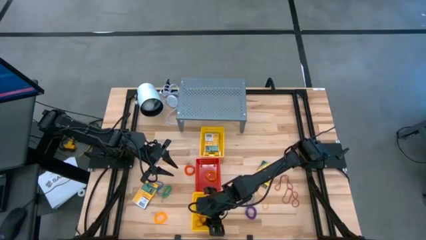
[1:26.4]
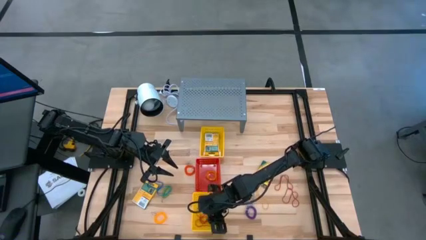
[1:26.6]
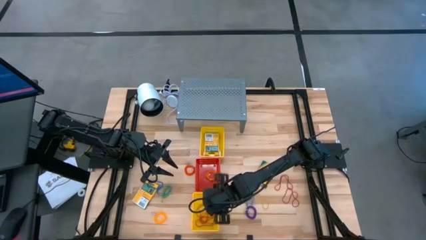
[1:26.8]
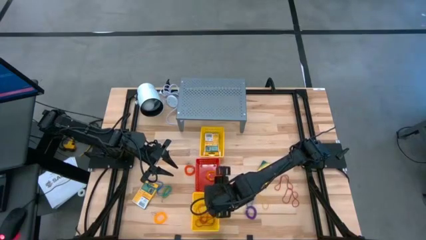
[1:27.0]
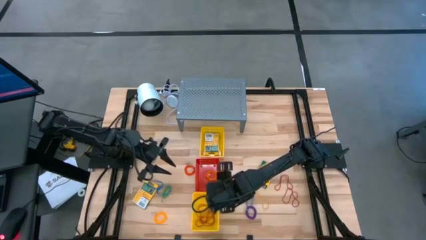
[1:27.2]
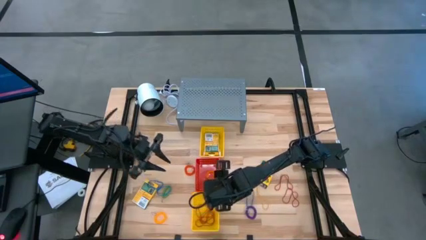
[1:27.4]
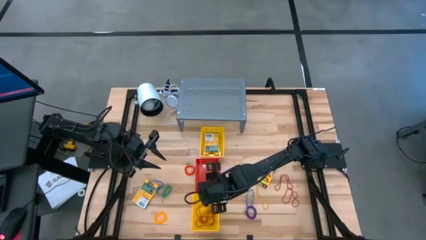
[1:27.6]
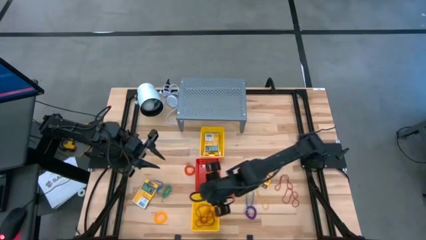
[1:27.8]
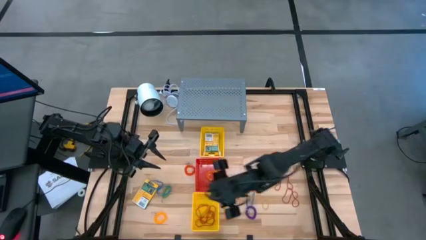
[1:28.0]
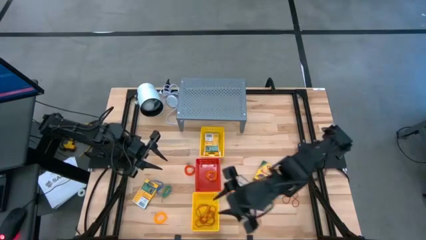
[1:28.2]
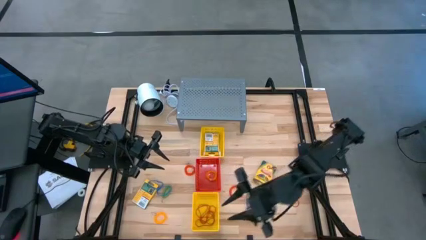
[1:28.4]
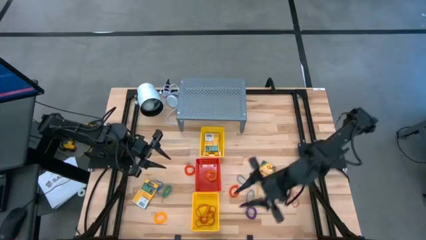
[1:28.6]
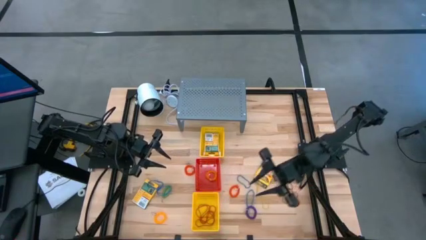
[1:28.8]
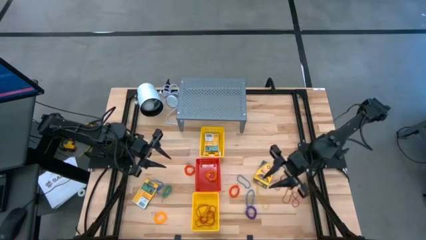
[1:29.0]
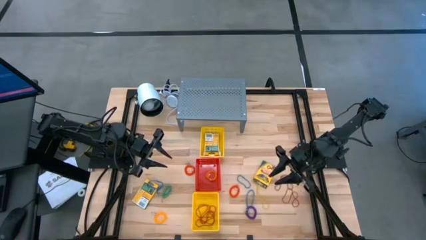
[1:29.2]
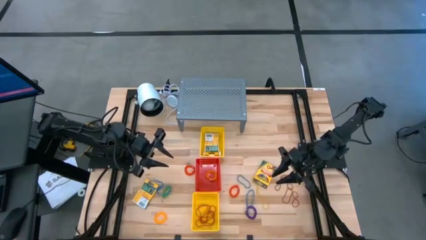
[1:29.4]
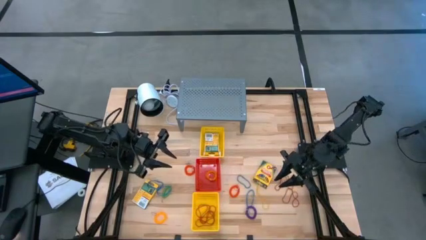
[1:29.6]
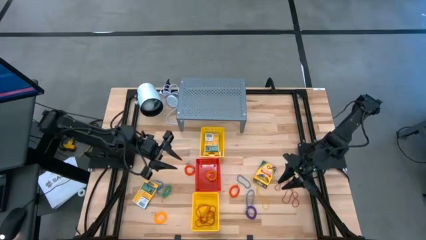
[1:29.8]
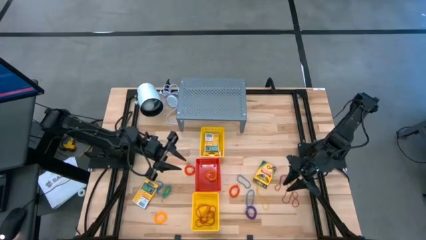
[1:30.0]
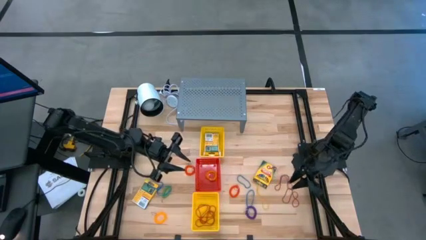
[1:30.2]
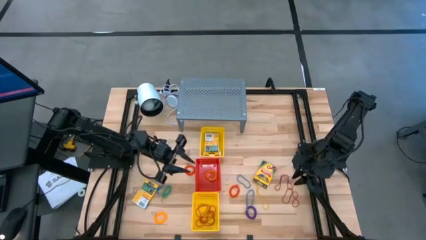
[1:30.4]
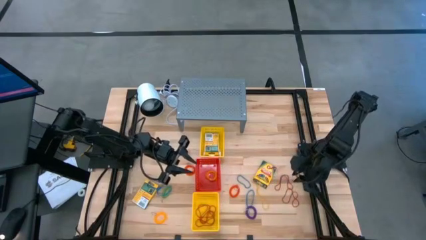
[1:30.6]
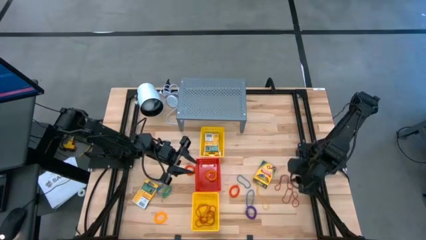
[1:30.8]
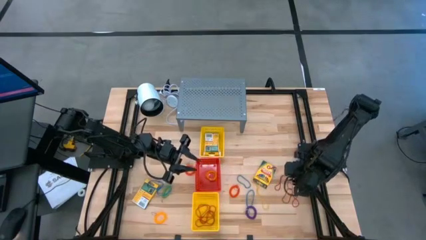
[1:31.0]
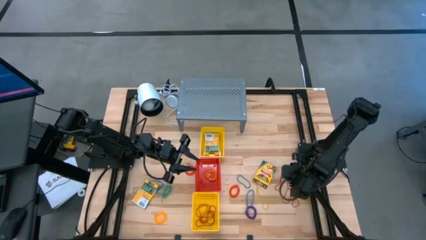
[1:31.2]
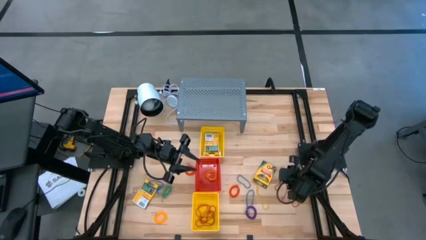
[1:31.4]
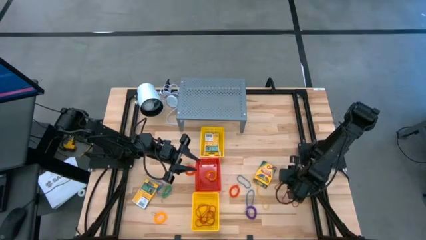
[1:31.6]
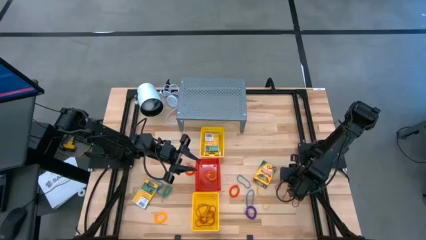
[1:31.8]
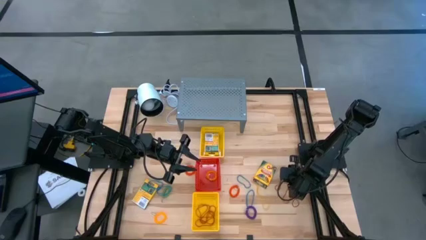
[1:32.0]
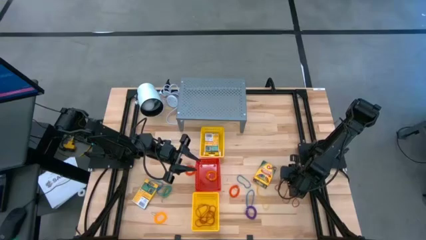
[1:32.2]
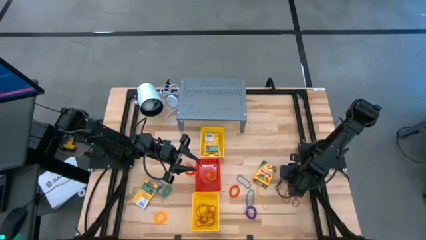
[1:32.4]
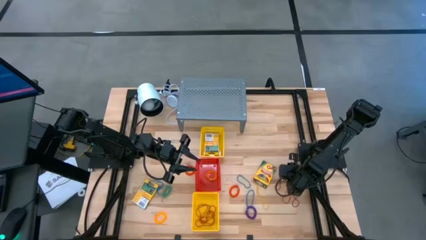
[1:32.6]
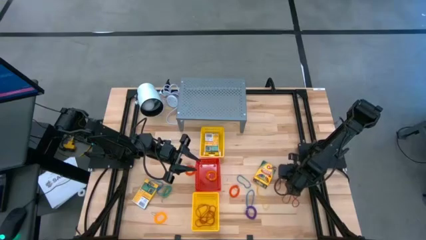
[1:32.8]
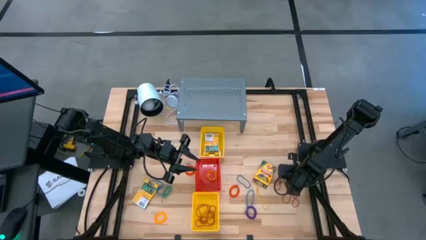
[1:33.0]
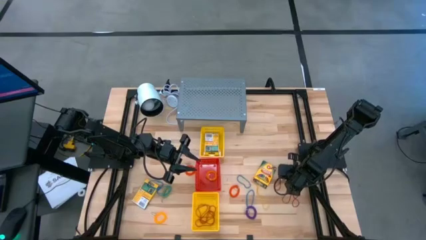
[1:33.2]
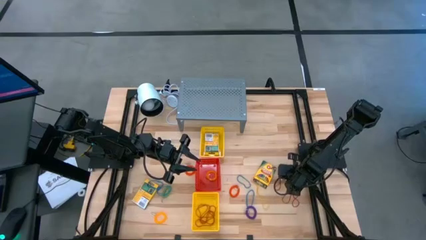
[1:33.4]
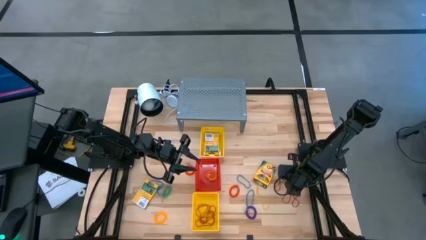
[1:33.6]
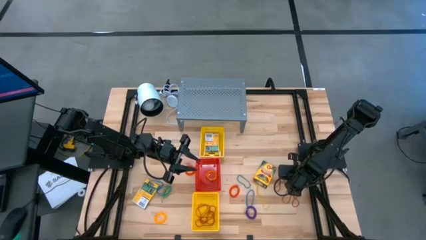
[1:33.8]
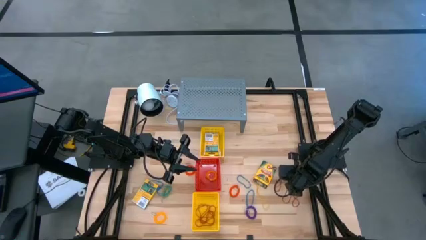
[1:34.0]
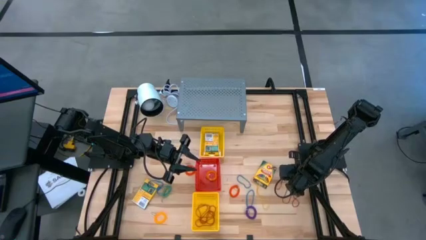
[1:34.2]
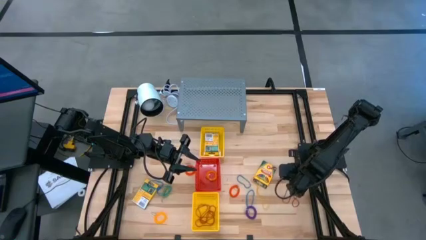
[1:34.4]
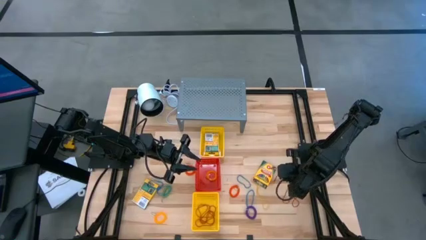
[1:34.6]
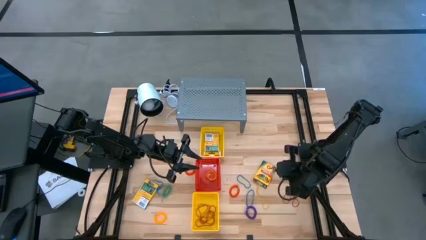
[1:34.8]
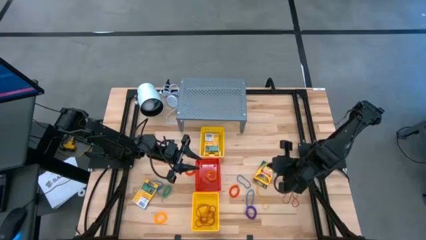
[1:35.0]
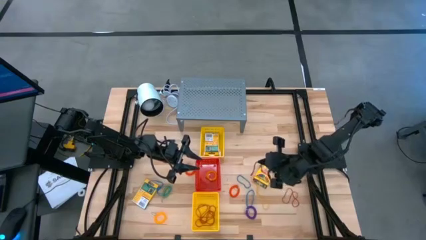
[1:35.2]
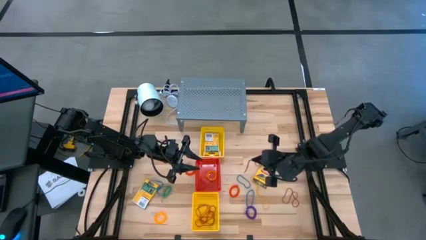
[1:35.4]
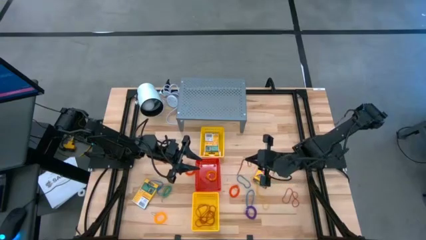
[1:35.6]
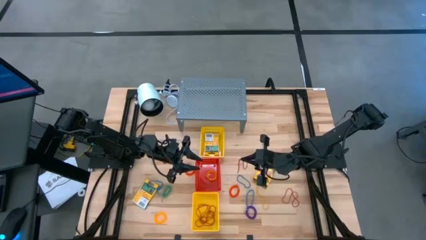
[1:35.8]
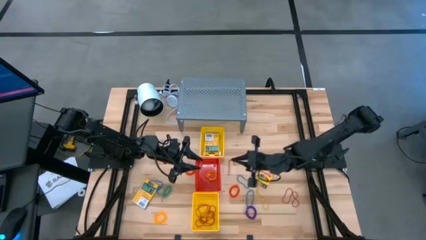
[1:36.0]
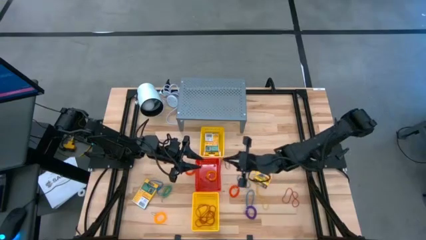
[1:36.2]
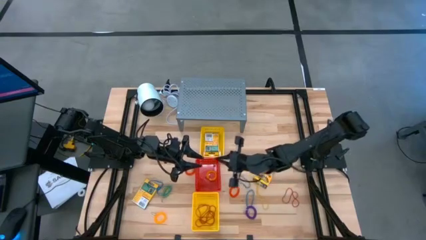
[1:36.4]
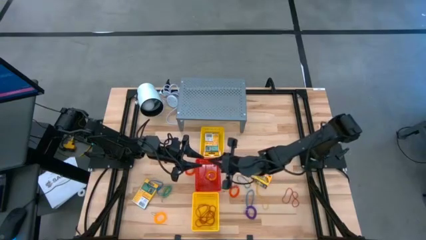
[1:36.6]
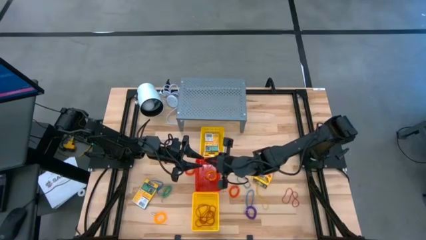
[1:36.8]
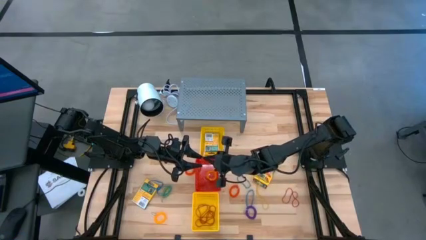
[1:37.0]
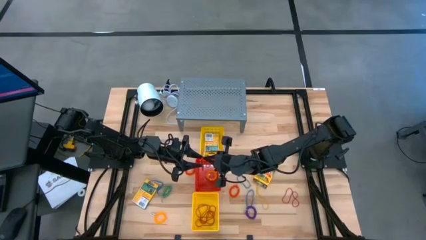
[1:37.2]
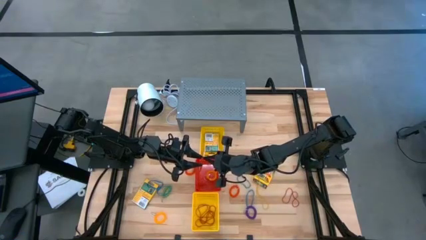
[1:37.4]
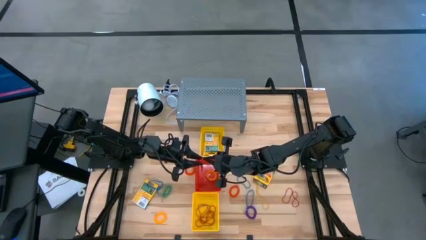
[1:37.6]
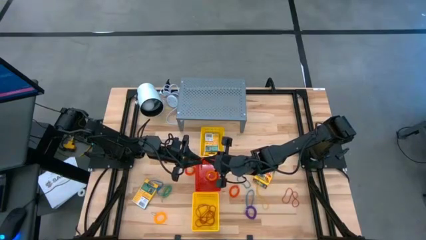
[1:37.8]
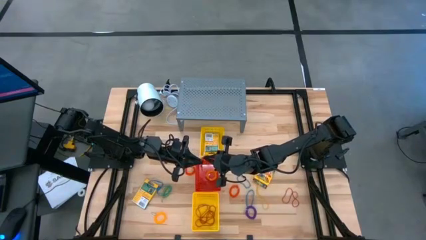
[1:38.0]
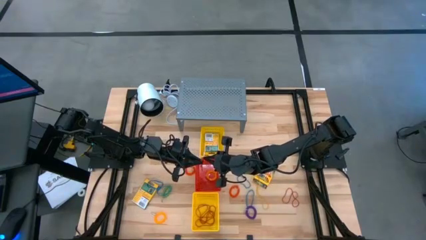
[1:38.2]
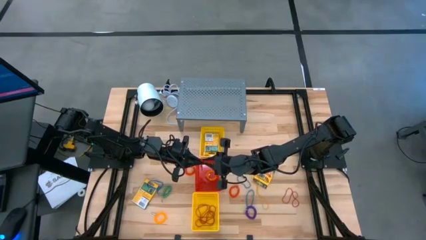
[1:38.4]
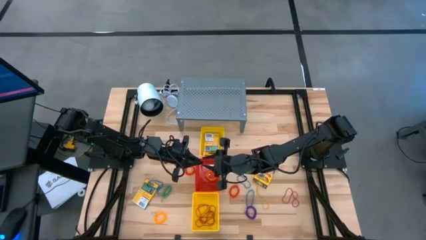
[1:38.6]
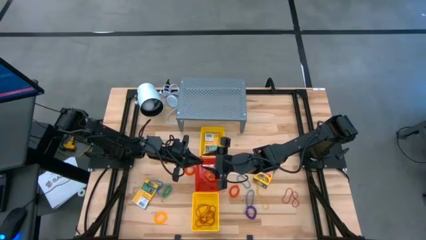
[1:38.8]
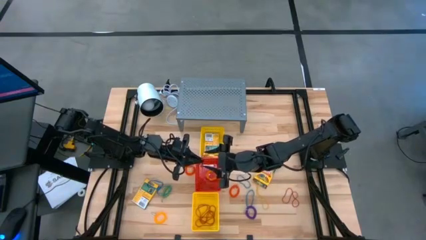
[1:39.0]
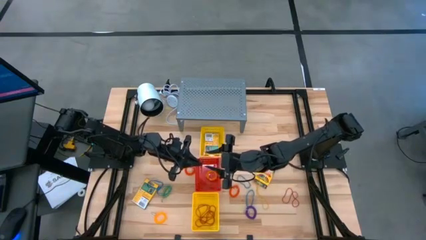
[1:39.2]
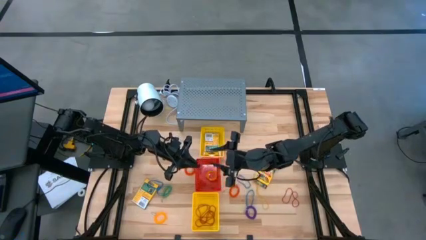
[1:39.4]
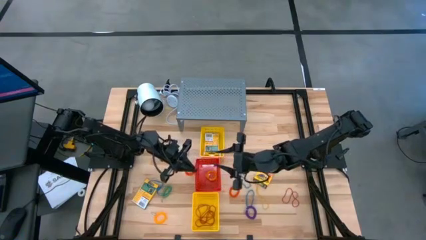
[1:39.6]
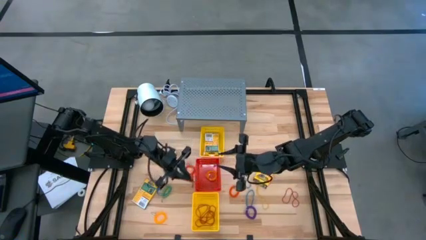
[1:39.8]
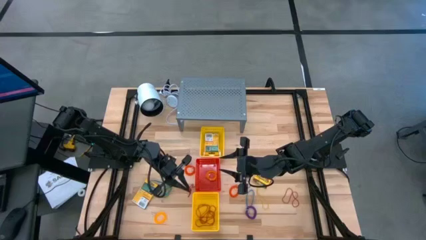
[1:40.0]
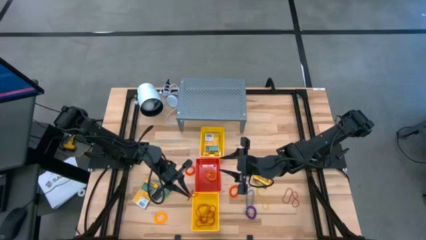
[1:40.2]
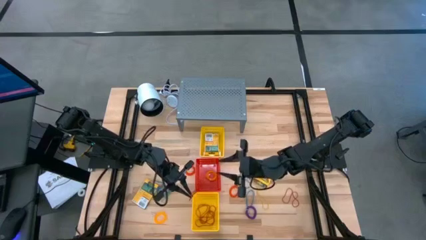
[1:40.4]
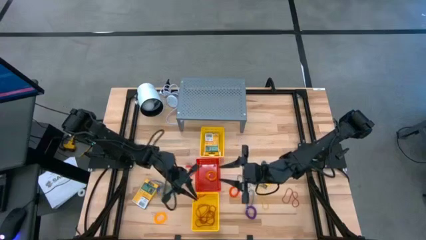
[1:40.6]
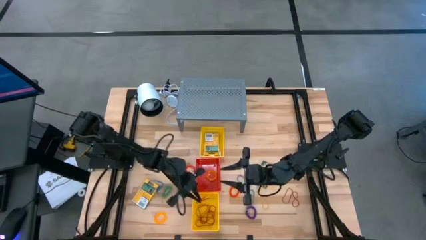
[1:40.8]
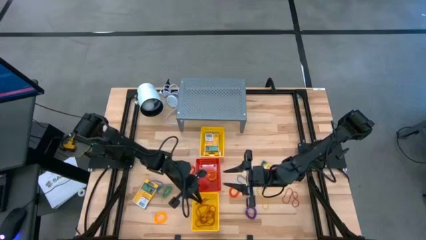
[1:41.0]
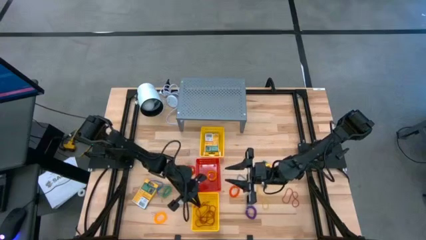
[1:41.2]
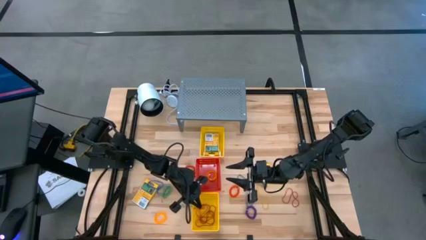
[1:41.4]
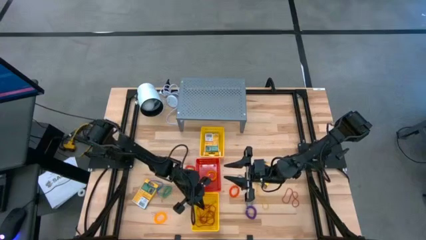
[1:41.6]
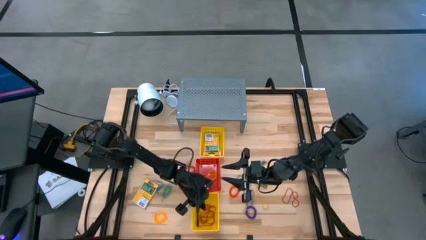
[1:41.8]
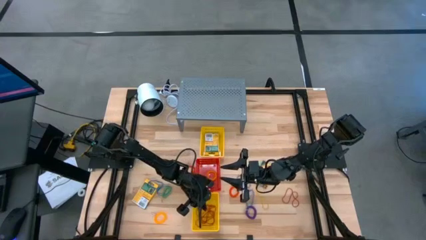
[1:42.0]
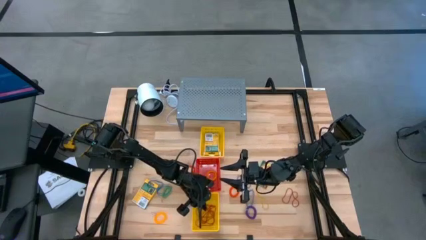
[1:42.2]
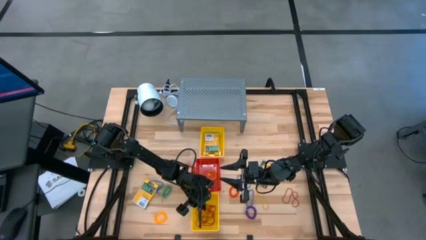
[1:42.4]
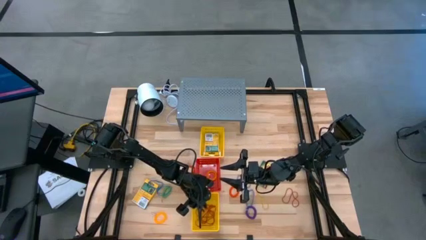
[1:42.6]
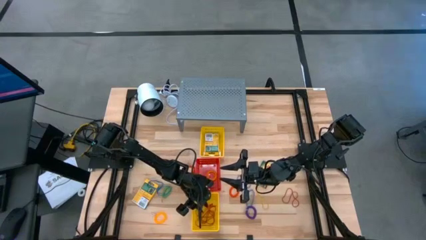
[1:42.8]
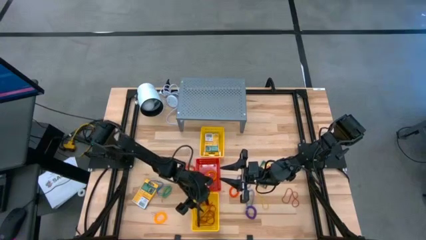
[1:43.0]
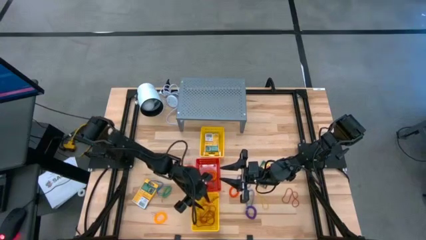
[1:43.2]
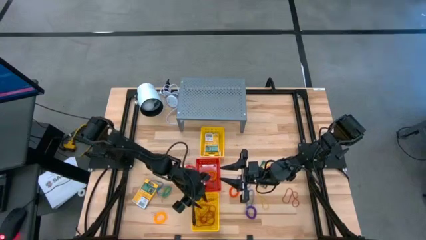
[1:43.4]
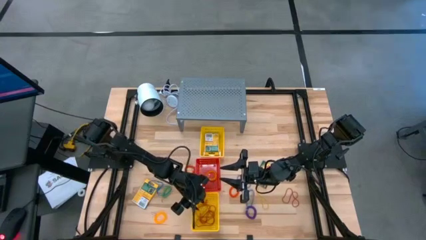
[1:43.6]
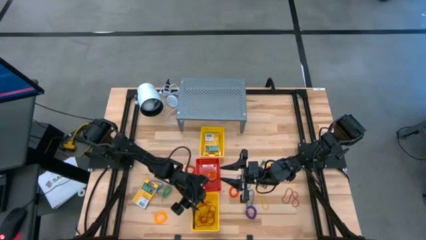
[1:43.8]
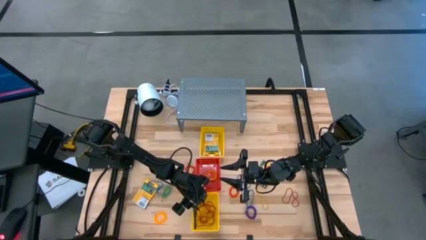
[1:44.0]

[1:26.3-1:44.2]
Task: Pick & Place Office Desk Supplies
Put the red rubber band into the bottom yellow bin
